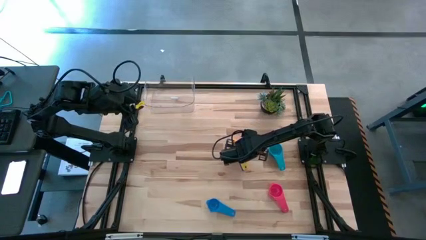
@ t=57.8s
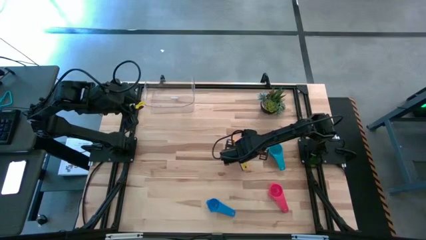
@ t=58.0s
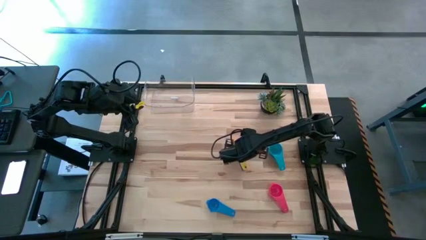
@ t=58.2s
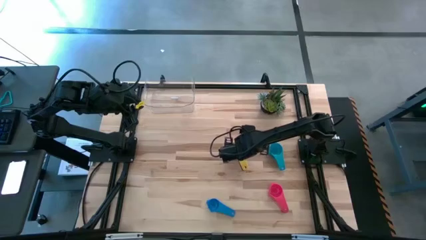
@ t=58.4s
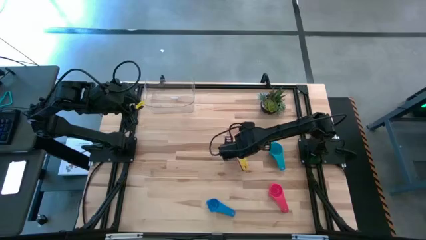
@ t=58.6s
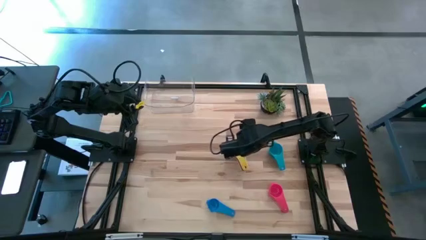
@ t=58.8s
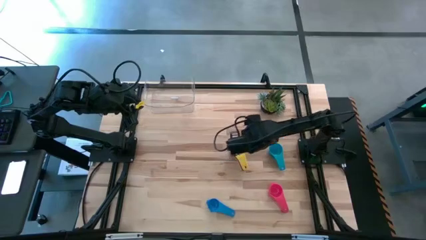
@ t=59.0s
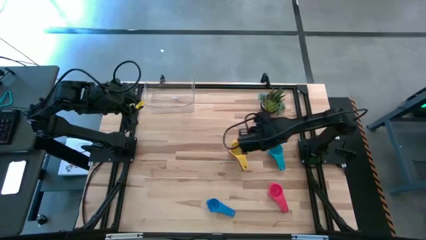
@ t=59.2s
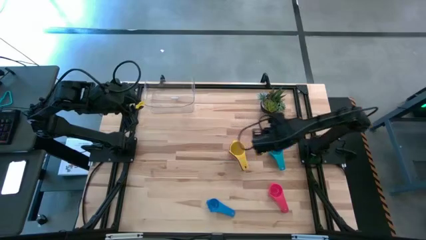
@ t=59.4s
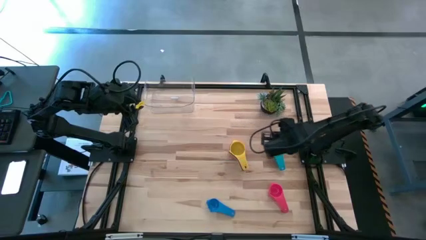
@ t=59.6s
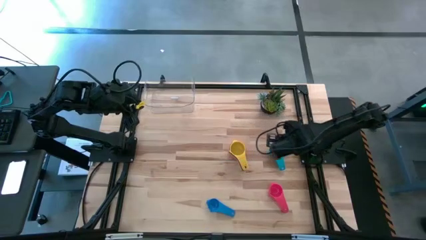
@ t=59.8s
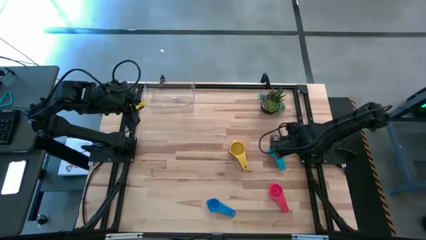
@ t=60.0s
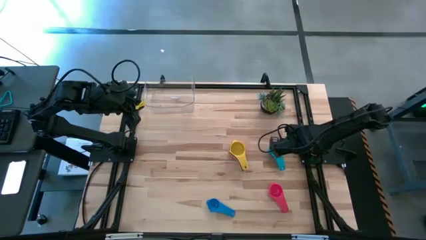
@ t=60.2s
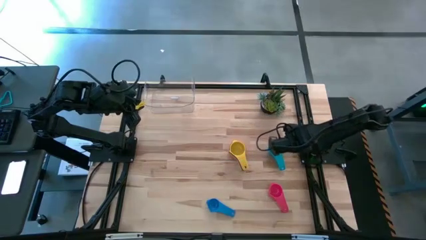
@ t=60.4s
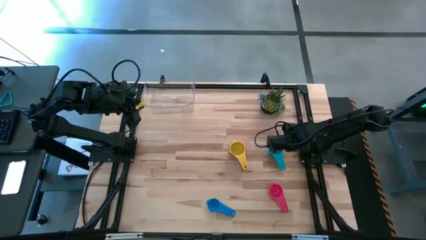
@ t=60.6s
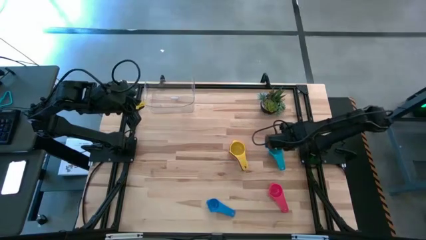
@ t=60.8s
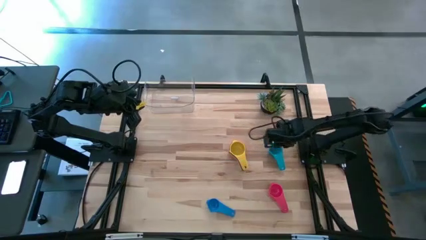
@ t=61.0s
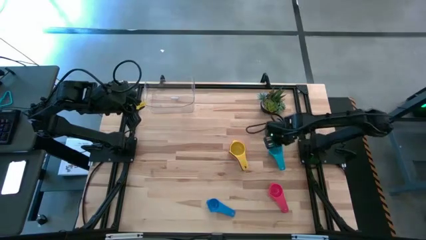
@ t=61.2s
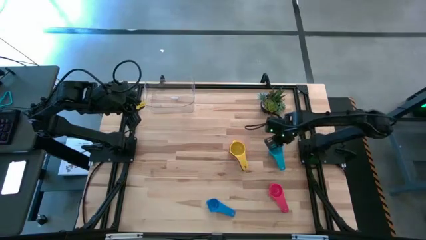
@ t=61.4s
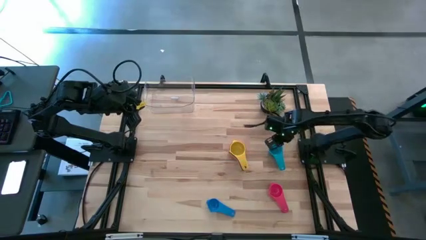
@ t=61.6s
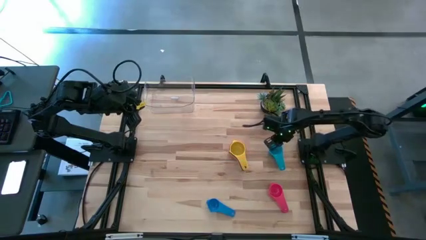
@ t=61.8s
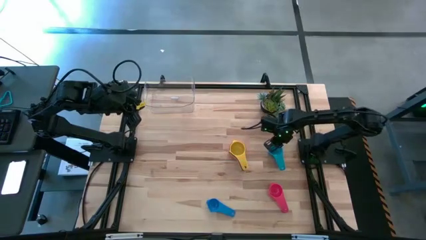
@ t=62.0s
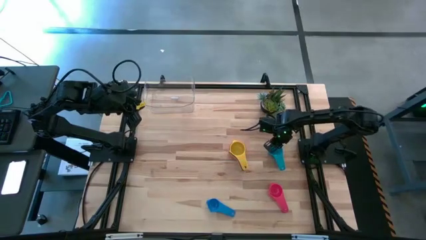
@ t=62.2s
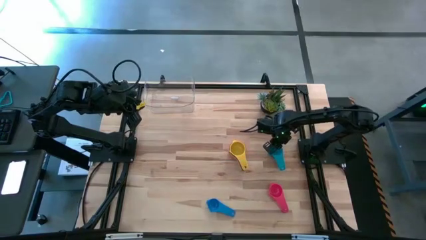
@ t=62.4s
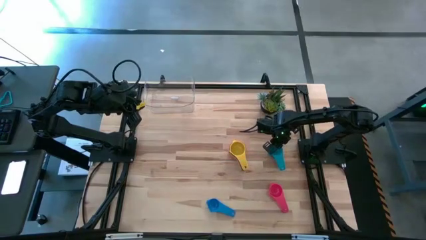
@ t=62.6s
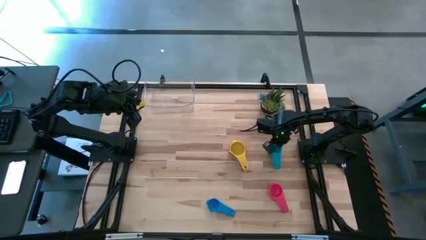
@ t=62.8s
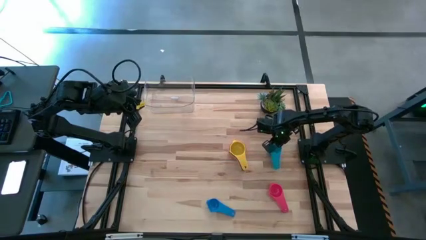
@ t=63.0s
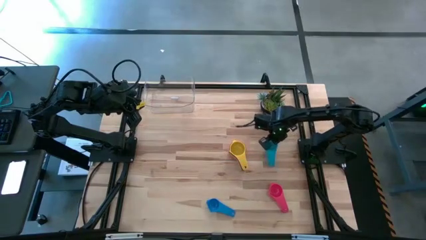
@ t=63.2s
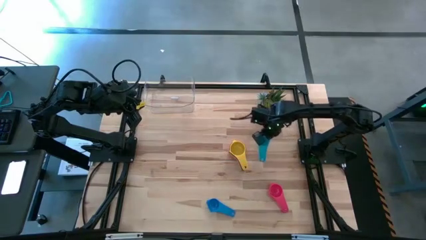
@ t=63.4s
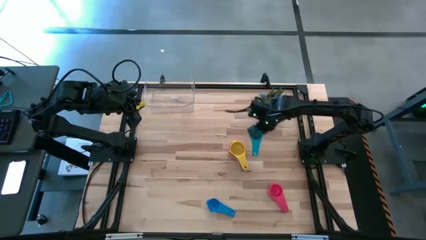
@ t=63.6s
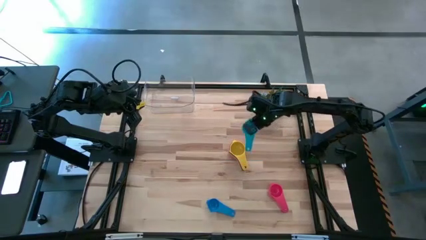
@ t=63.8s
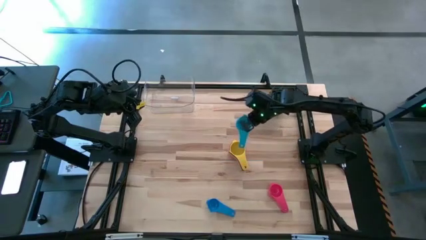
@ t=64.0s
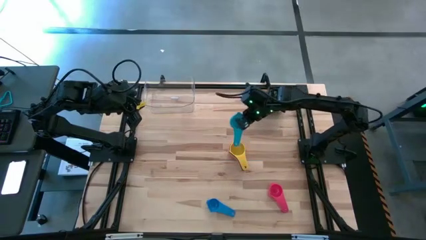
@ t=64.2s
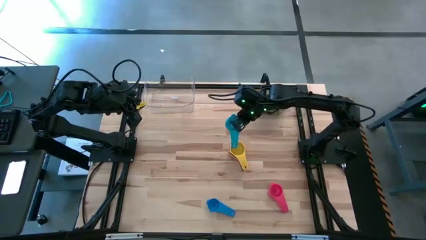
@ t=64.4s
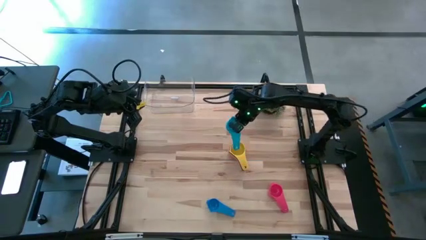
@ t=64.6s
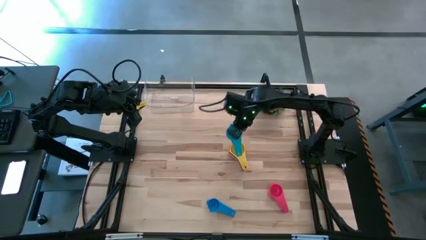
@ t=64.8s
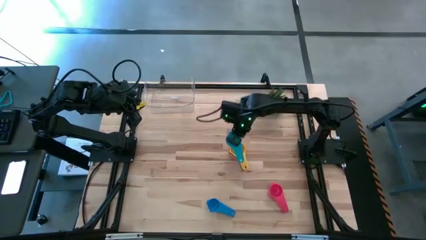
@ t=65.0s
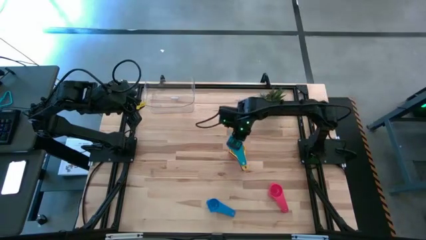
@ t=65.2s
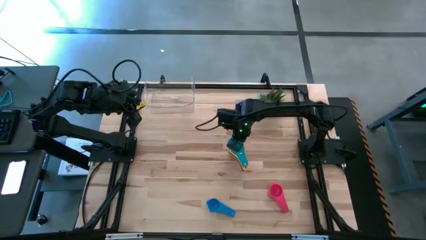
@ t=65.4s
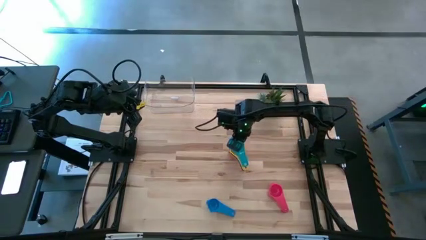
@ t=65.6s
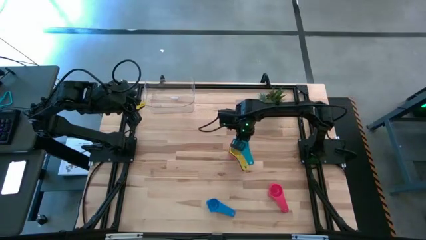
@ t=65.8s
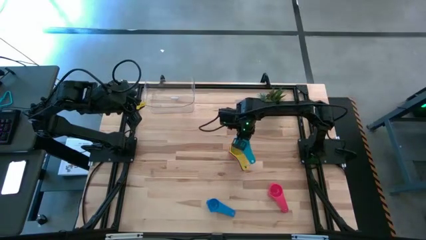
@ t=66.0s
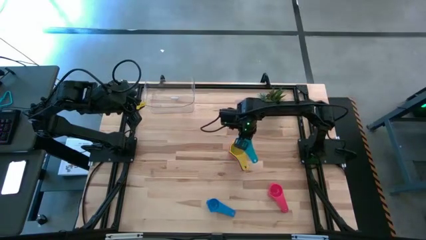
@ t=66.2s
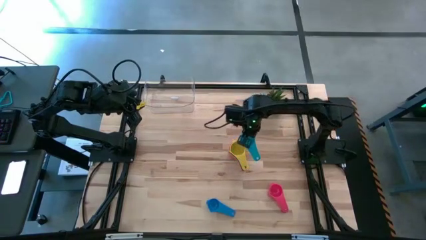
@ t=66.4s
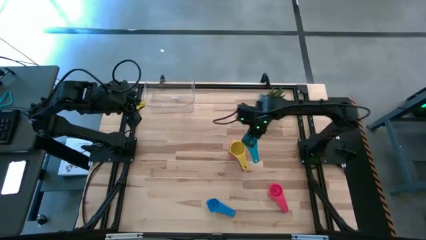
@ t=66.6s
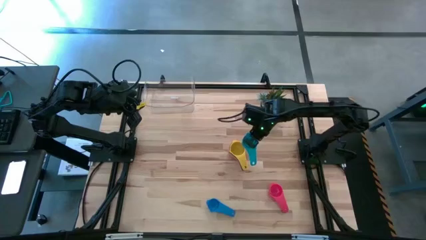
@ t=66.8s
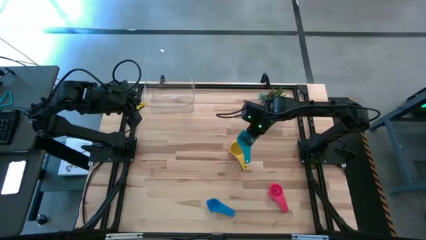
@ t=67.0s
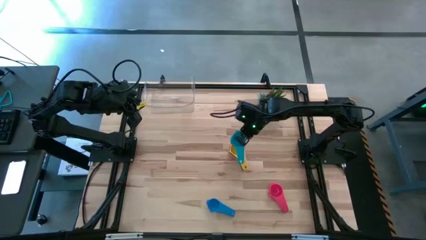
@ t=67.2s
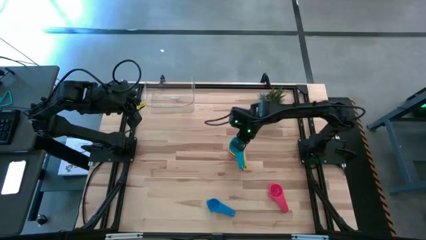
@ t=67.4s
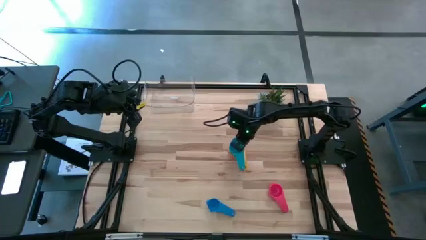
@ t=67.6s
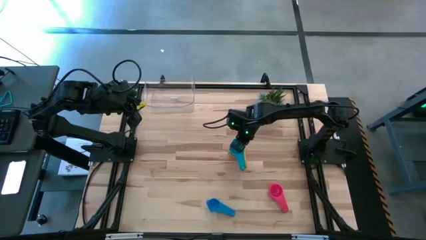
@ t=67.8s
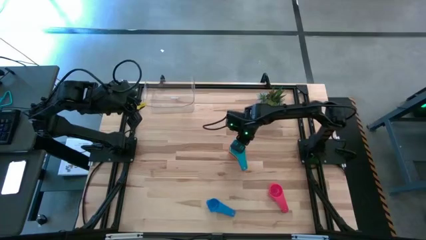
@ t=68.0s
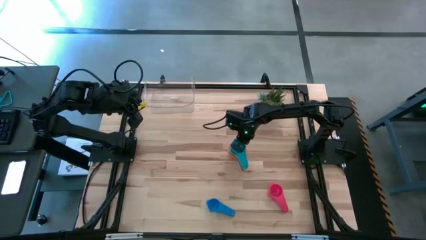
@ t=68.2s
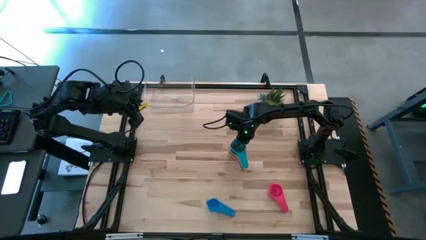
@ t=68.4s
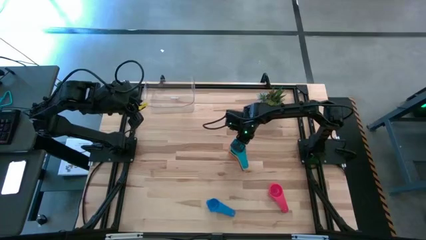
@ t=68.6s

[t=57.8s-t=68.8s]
Task: Nest measuring cups in basket
Stack the light blue measuring cup on top of the yellow measuring cup
